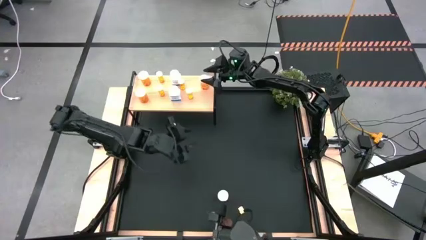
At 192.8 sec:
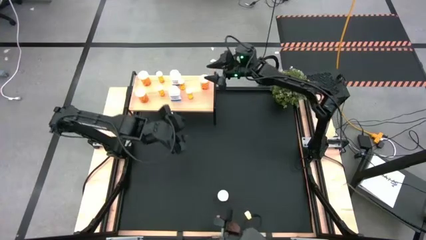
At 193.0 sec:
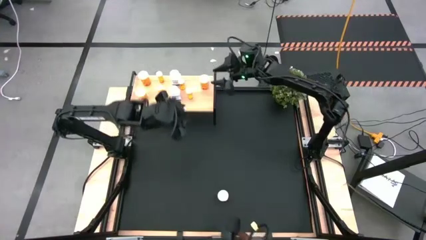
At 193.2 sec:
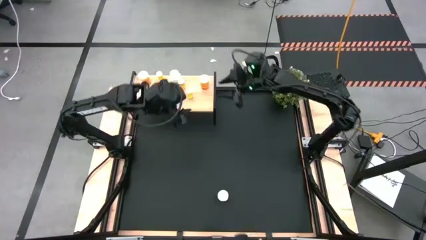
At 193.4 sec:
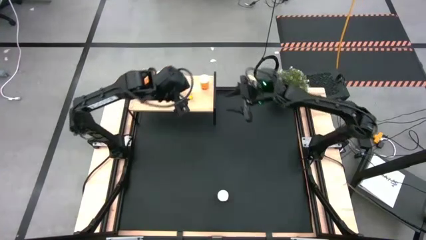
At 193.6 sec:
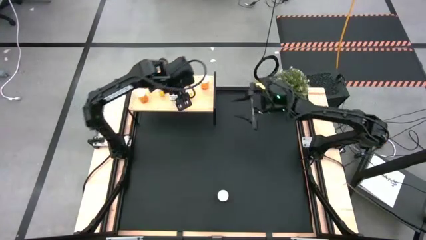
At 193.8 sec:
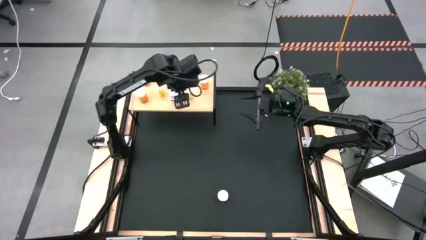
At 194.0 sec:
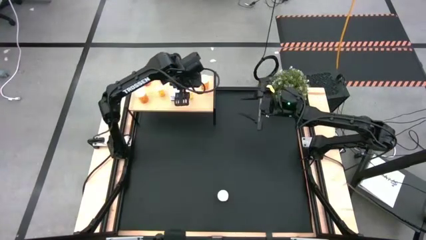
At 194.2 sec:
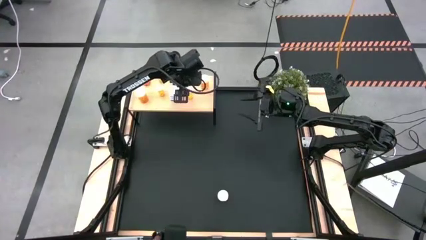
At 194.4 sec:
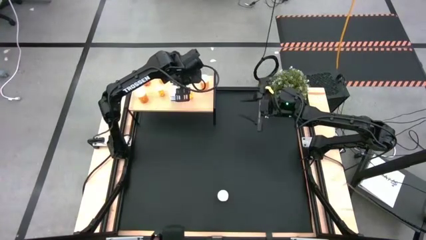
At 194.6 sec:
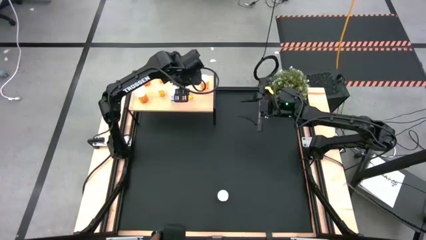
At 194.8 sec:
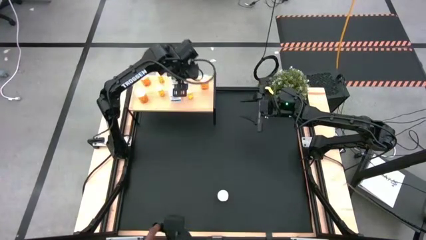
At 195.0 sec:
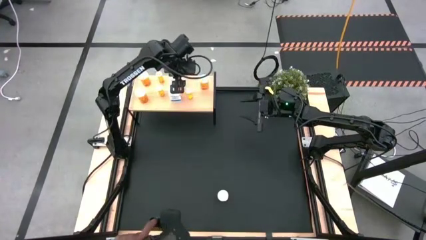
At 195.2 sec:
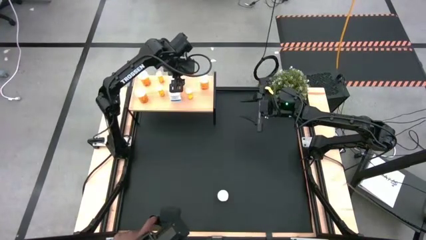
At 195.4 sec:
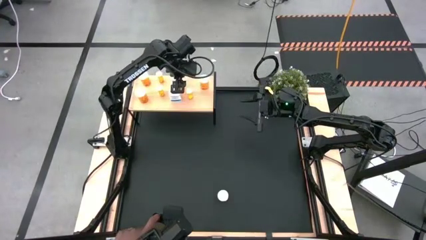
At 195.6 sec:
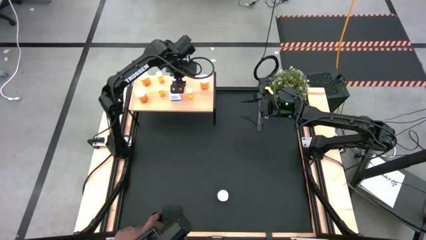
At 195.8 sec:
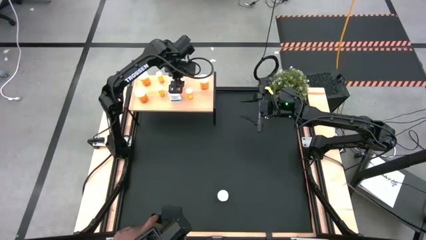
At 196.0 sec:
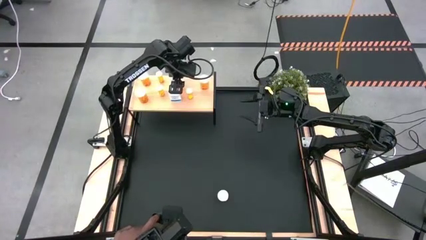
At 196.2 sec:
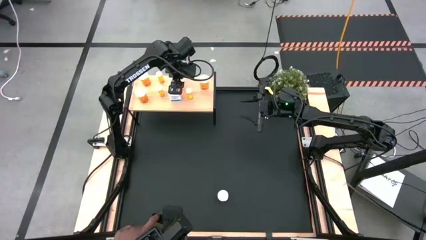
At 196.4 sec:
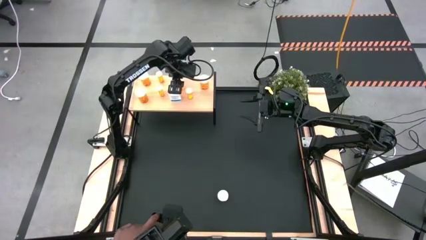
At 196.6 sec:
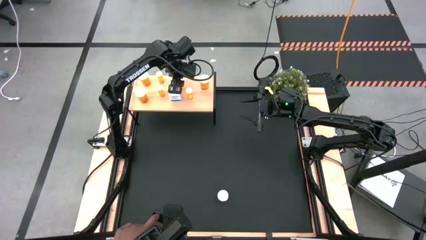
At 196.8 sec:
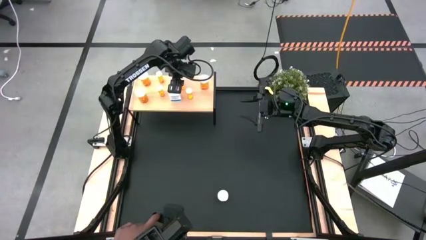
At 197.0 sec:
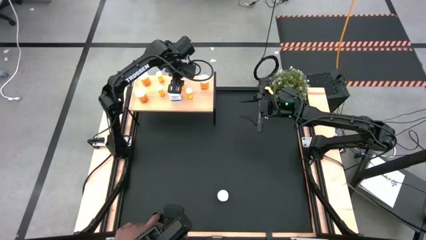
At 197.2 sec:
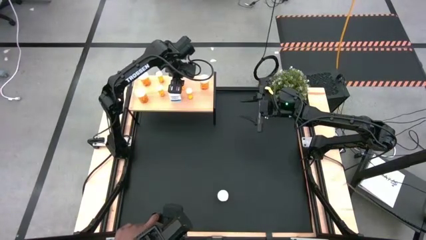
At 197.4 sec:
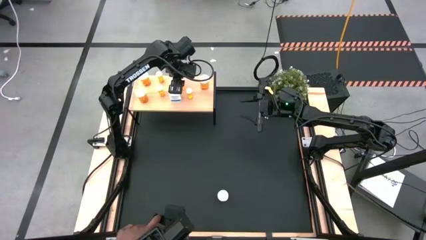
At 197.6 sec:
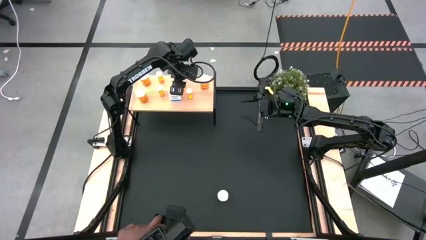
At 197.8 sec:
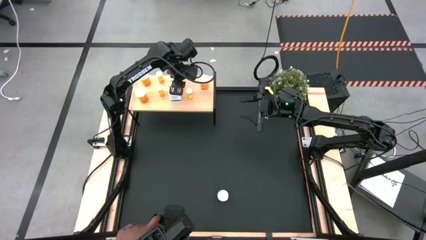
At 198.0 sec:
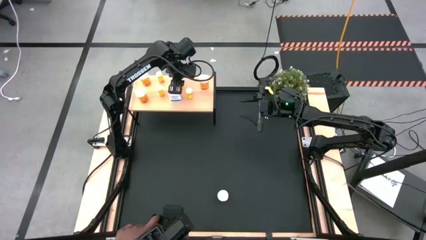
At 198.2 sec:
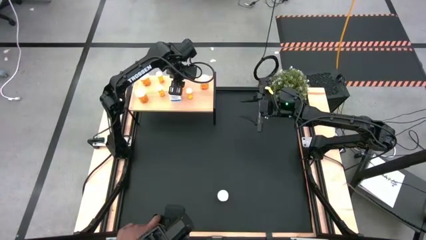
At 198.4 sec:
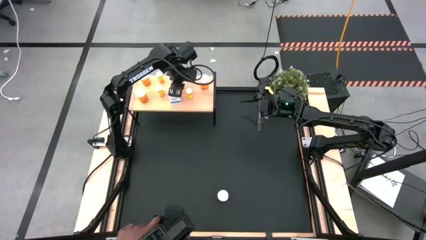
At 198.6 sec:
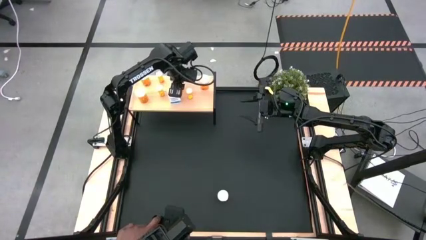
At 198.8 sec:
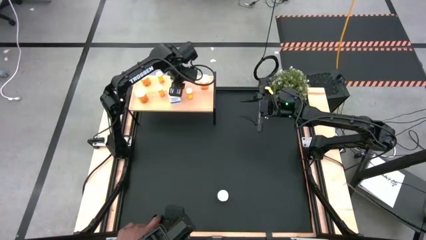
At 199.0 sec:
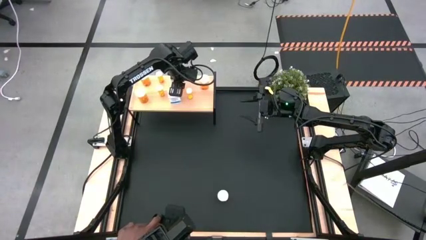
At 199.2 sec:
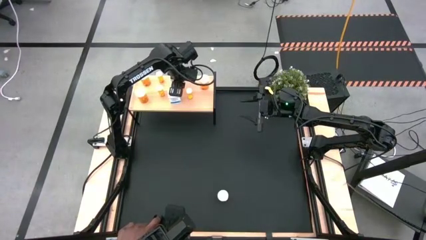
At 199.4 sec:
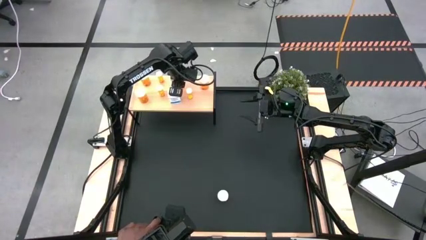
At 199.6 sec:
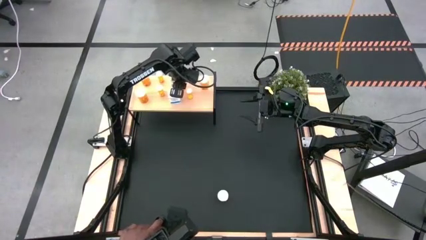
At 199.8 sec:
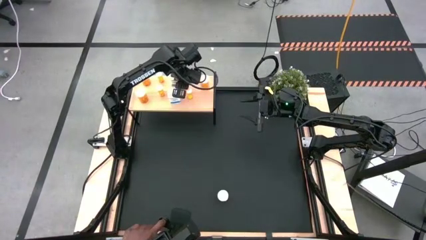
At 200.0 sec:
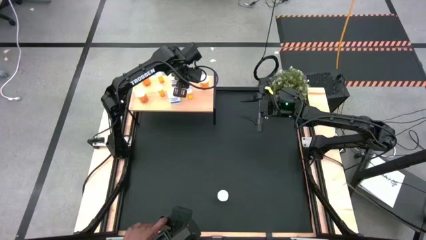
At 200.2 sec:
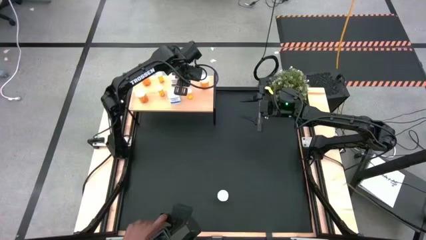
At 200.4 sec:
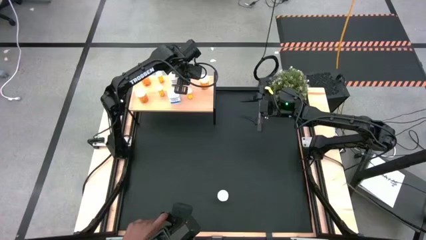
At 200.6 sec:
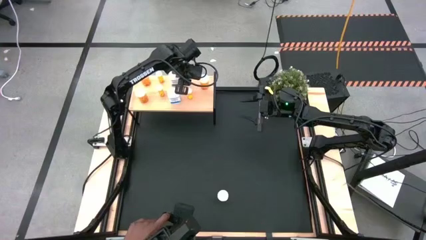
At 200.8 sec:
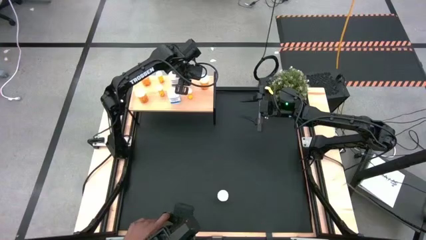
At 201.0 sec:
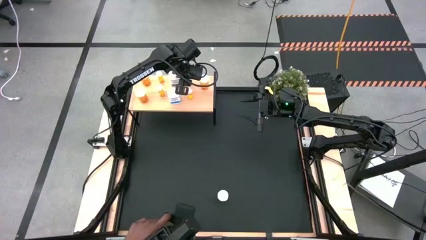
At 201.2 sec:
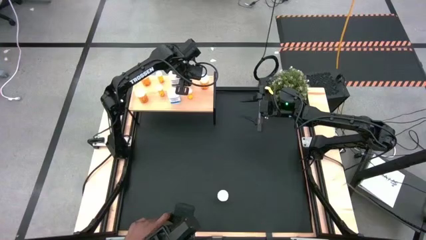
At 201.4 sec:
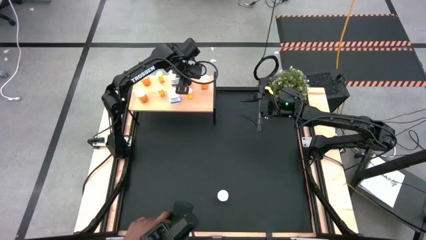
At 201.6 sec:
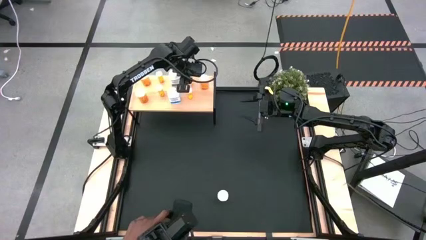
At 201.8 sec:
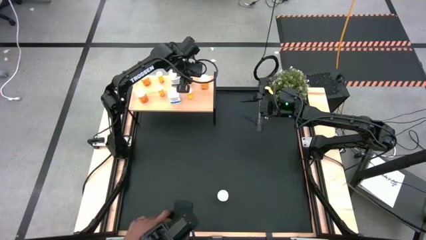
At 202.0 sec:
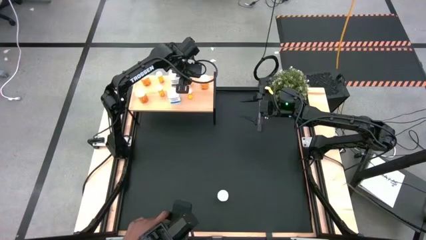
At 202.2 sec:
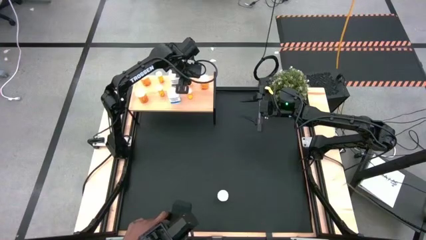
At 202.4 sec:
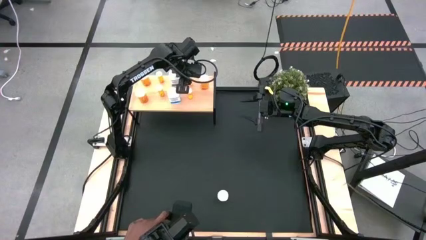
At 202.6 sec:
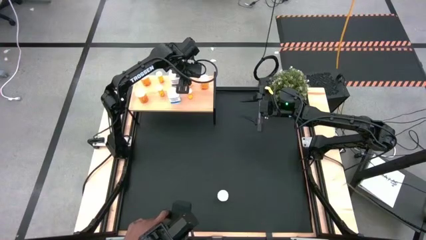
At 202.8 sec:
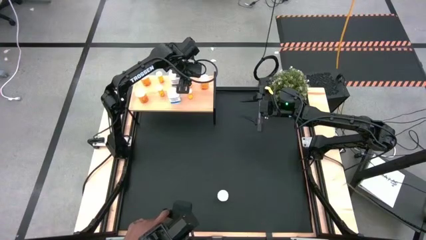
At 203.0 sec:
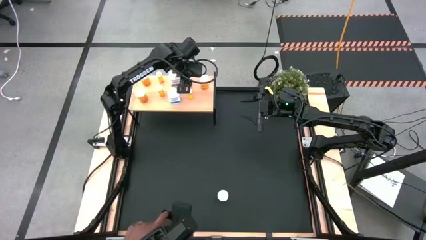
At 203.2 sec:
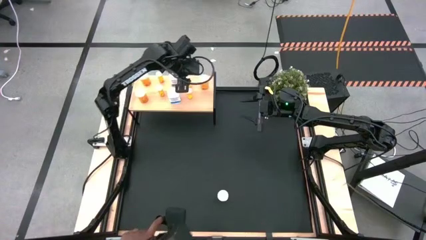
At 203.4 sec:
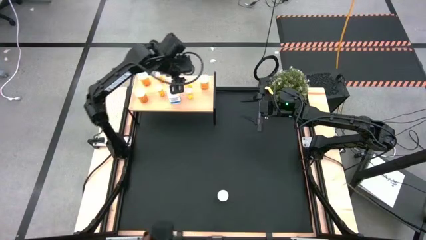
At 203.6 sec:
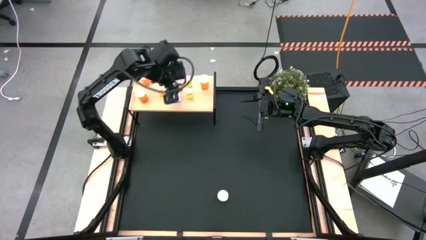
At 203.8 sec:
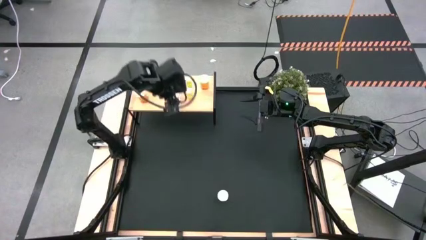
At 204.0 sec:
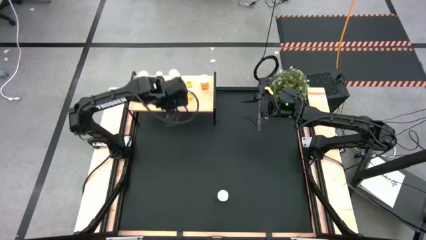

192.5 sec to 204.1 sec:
Task: Pick and place medicine bottles onto shelf by color
Adjust the pill bottles on the shelf
